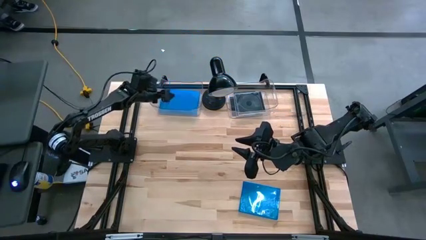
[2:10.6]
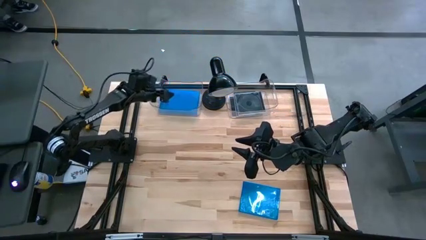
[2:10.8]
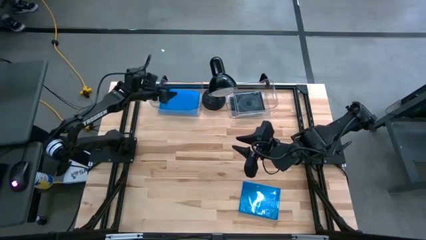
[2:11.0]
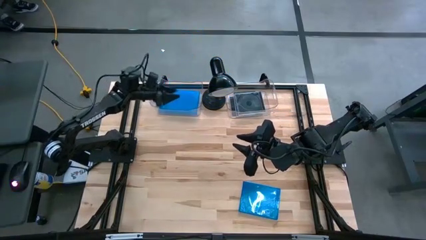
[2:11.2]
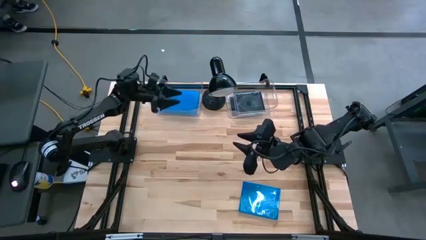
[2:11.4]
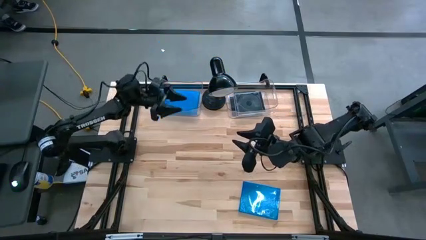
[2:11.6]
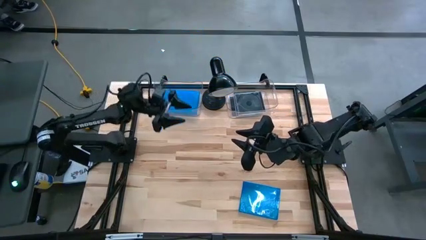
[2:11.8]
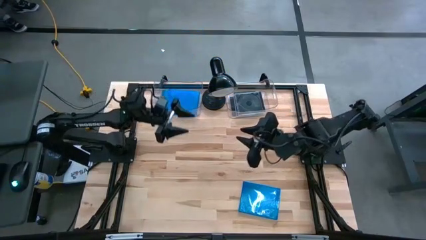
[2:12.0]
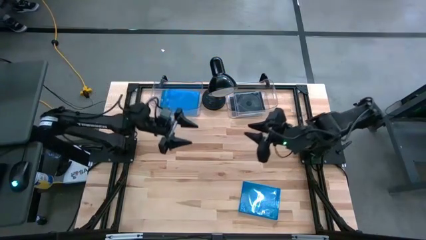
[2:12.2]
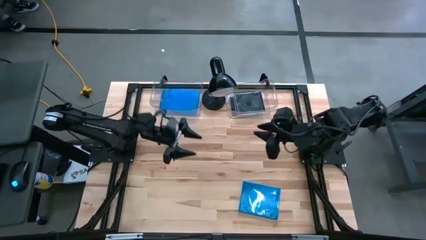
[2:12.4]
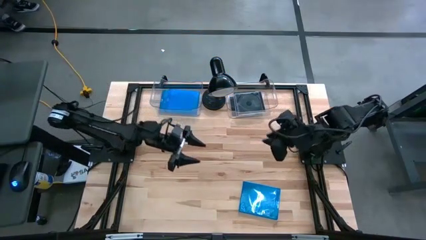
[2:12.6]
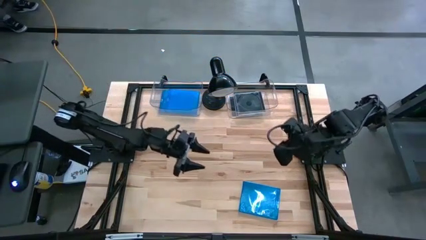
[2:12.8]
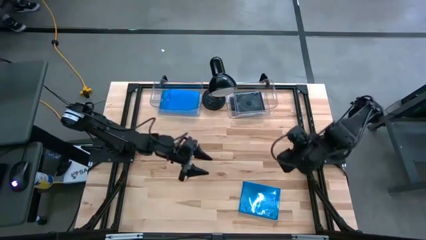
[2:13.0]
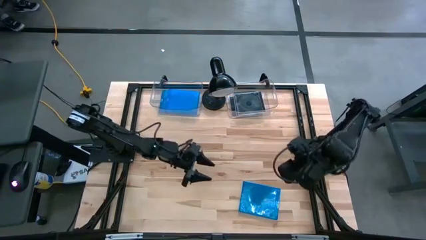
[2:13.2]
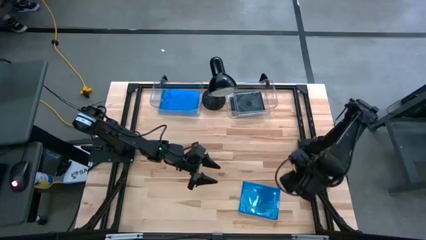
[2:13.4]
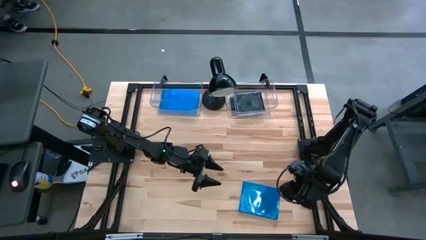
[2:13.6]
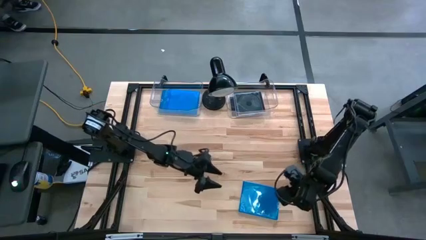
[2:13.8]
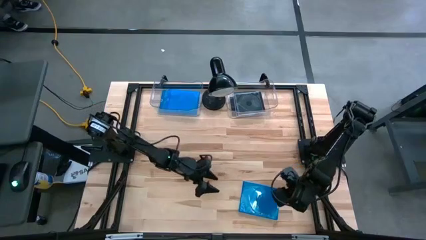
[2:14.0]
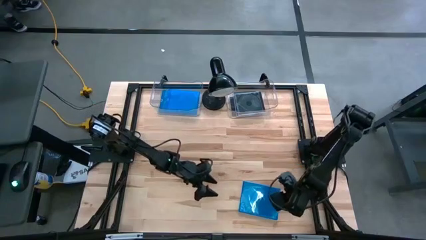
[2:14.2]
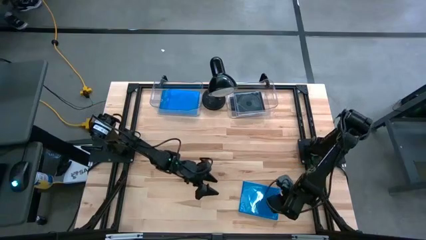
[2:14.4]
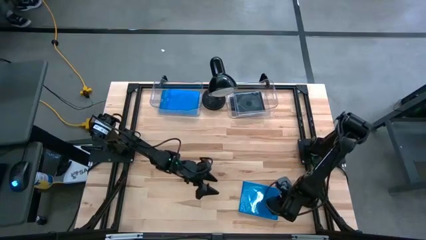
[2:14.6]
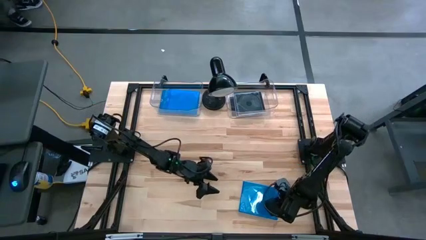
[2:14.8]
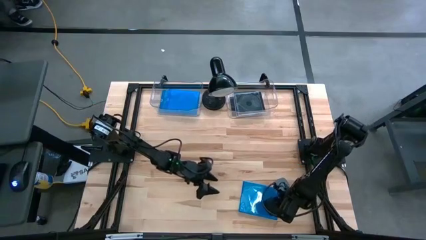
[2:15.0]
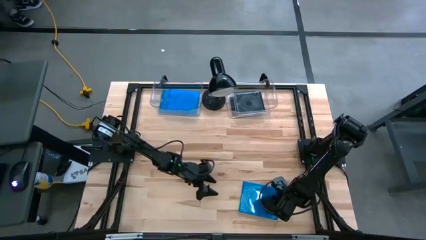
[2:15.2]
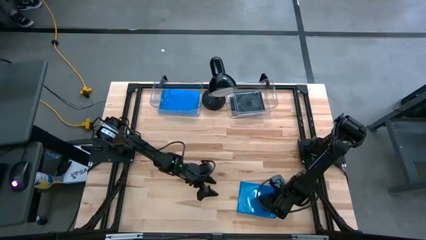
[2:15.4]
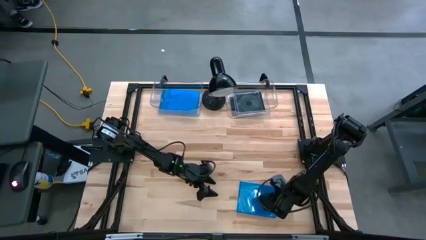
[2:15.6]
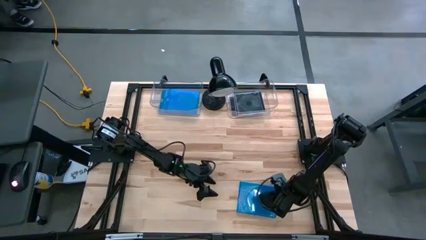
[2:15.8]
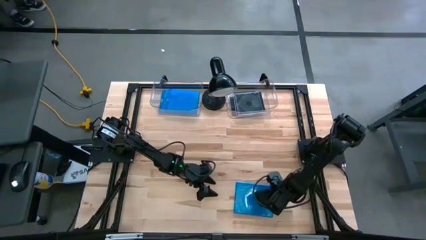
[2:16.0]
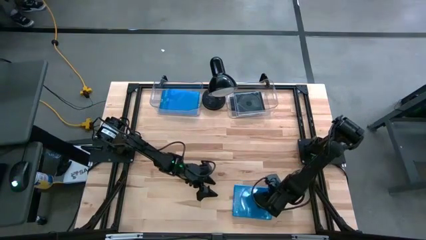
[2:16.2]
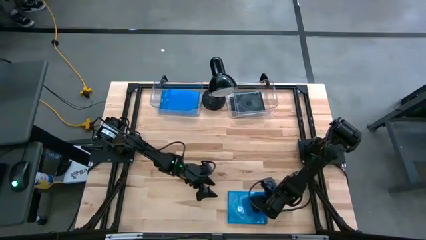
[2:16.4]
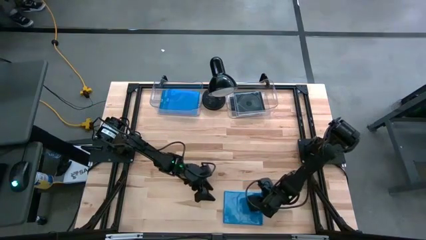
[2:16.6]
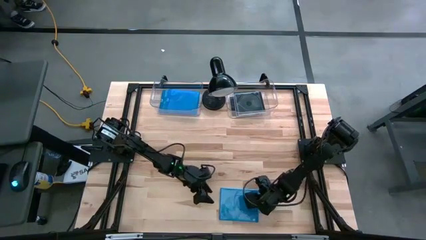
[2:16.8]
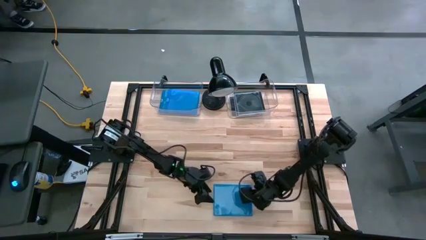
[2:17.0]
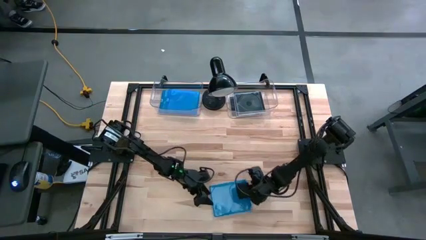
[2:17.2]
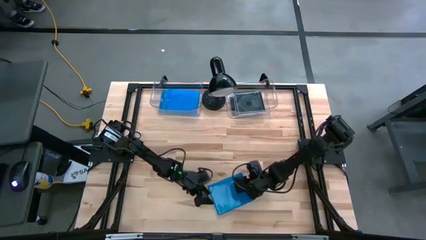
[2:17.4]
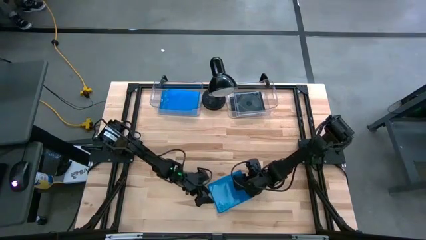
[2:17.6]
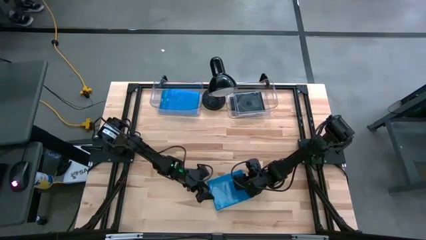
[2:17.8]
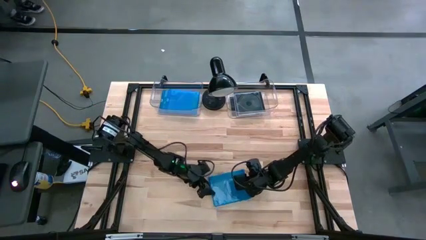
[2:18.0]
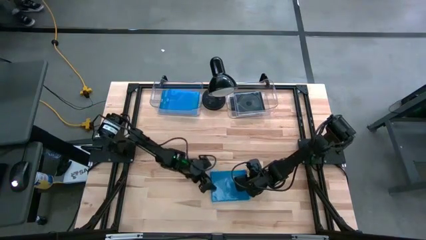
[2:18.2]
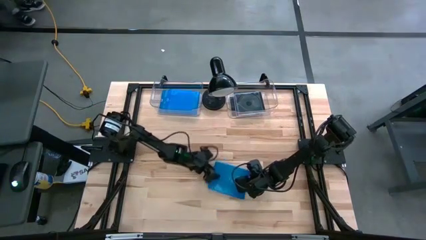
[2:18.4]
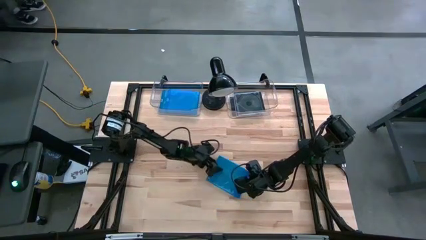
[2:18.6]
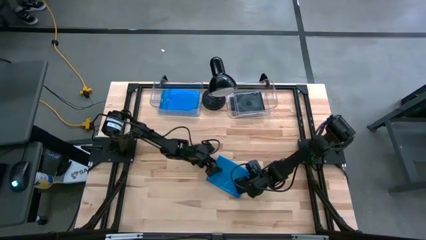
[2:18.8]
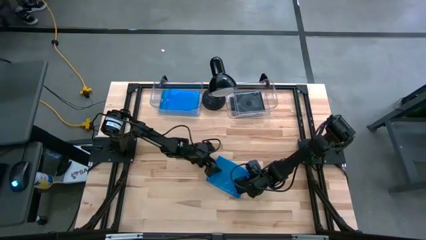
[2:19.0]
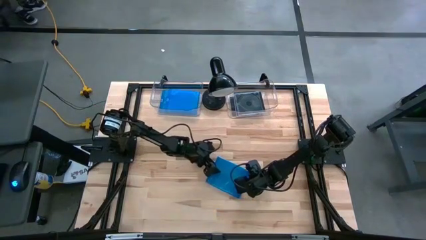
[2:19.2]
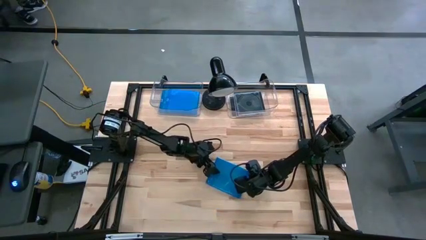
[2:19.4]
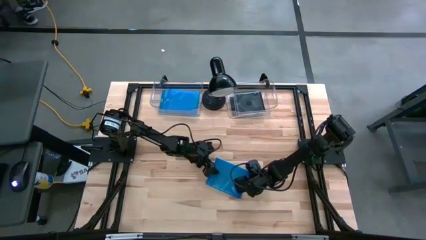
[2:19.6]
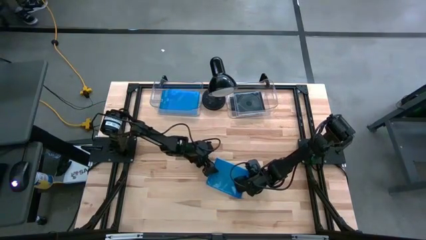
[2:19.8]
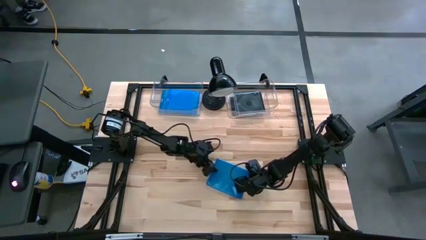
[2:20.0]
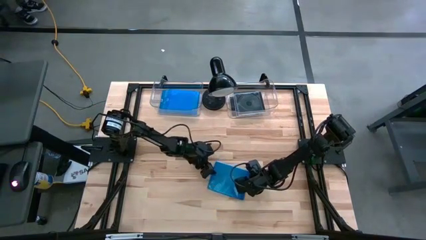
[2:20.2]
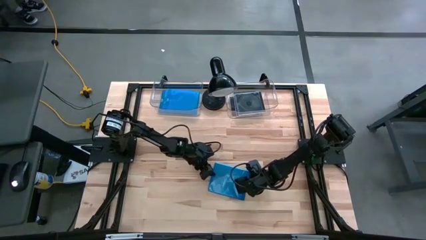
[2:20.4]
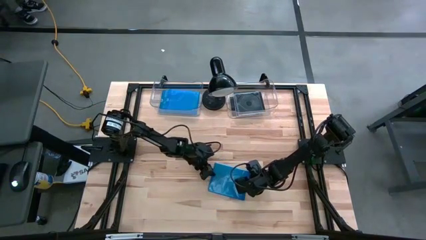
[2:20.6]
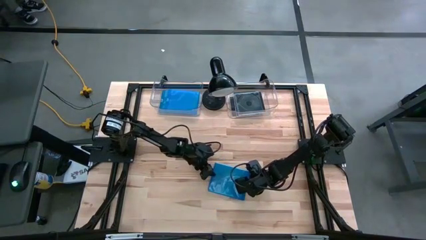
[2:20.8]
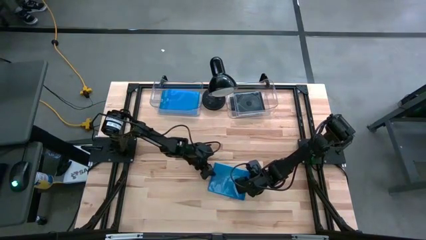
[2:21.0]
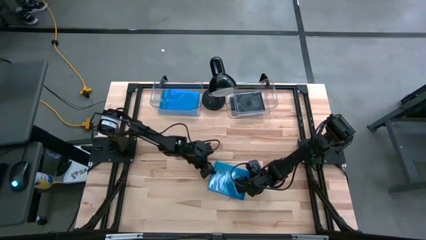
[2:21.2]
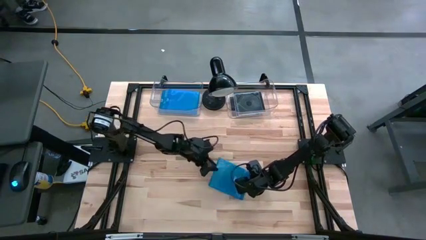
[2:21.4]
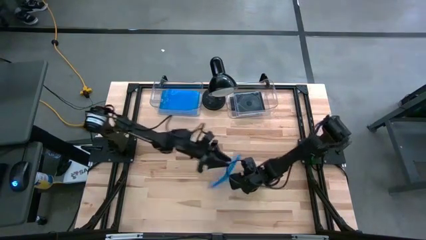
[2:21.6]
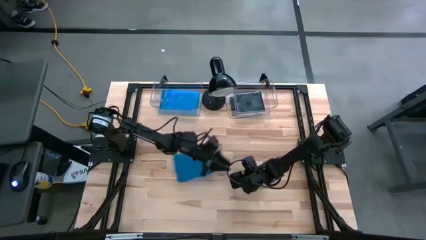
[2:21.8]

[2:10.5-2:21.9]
Task: Pick & place jewel cases by type
Put the blue CD case into the left transparent bin

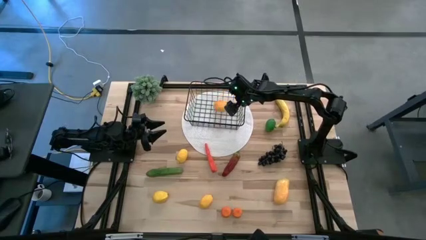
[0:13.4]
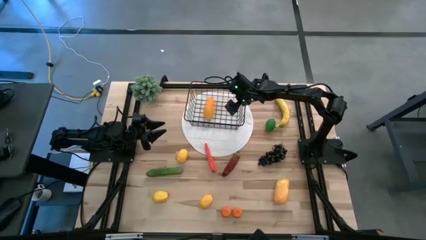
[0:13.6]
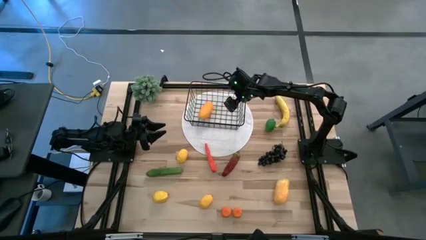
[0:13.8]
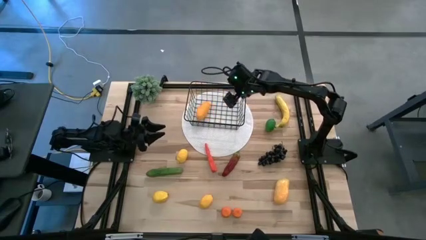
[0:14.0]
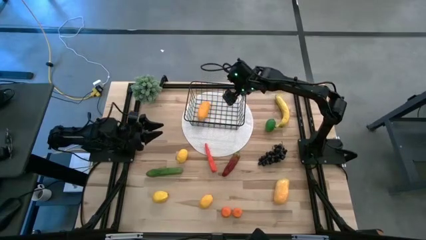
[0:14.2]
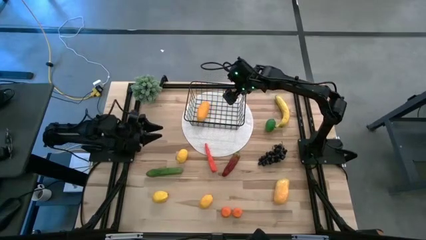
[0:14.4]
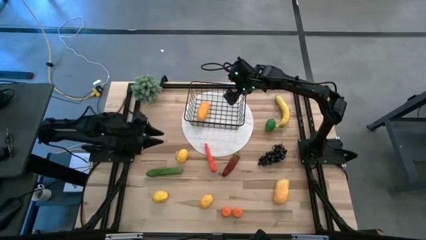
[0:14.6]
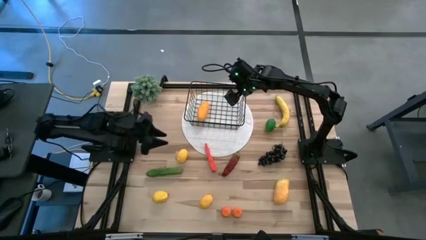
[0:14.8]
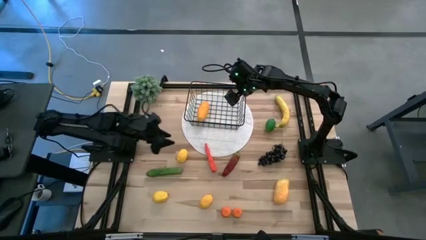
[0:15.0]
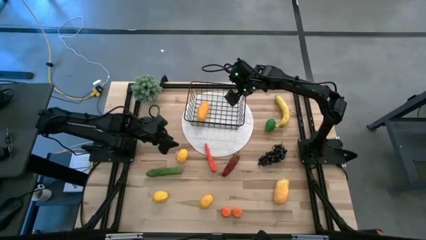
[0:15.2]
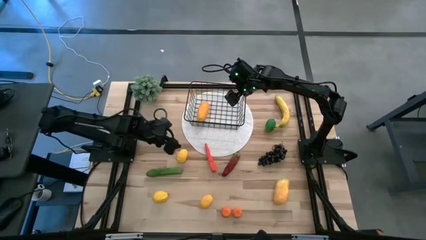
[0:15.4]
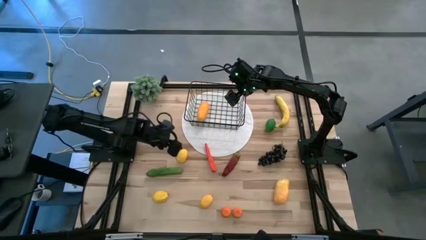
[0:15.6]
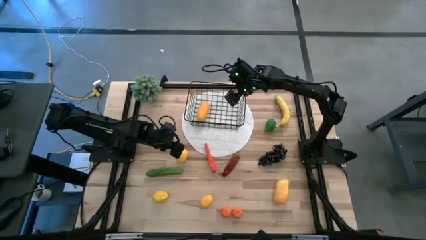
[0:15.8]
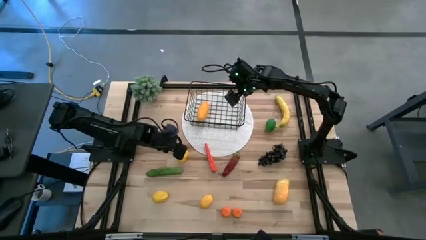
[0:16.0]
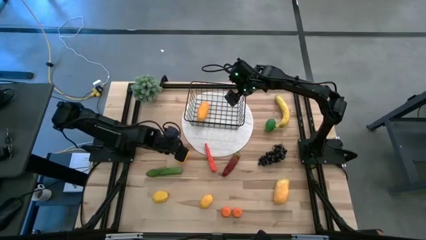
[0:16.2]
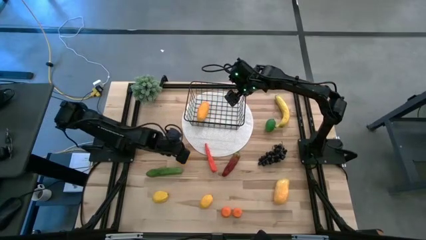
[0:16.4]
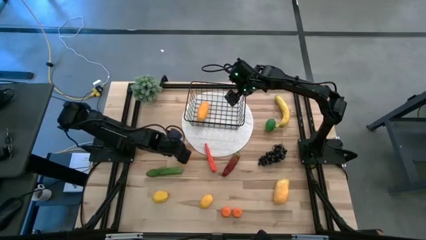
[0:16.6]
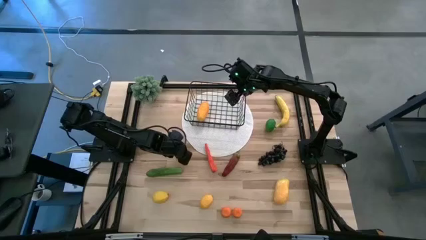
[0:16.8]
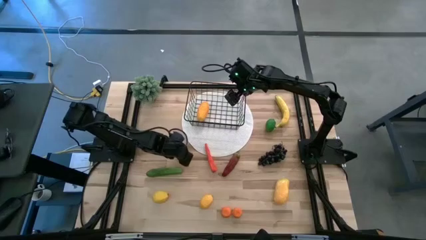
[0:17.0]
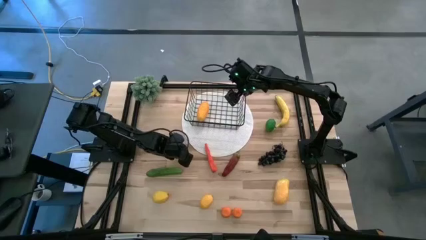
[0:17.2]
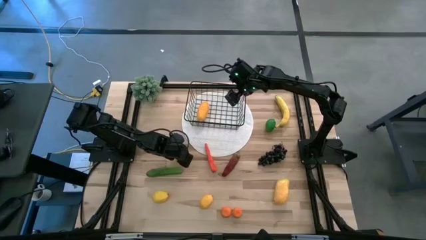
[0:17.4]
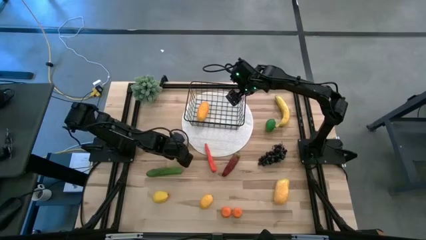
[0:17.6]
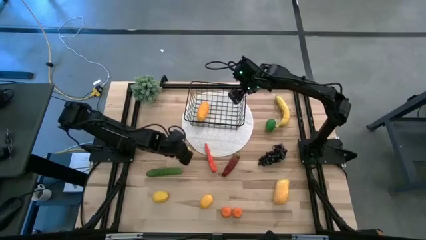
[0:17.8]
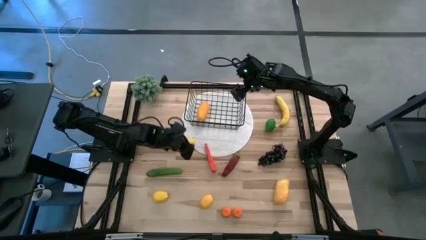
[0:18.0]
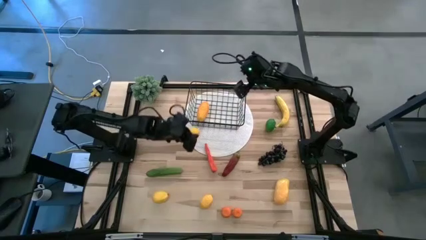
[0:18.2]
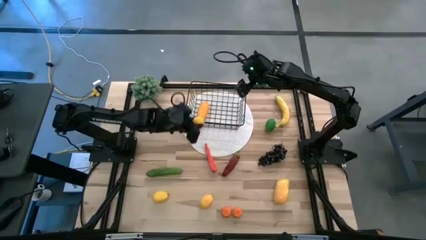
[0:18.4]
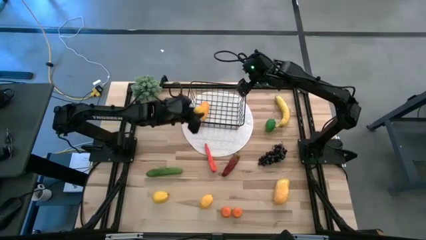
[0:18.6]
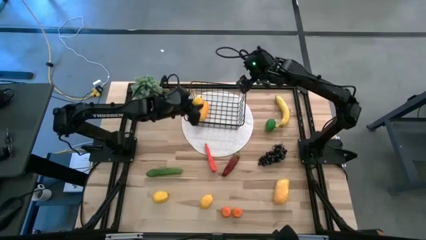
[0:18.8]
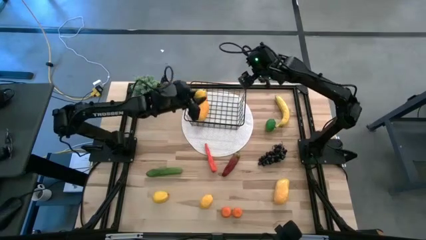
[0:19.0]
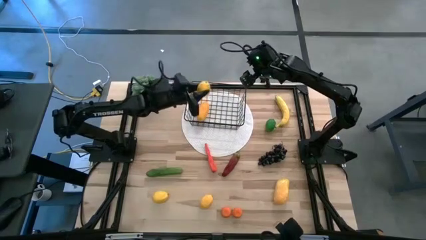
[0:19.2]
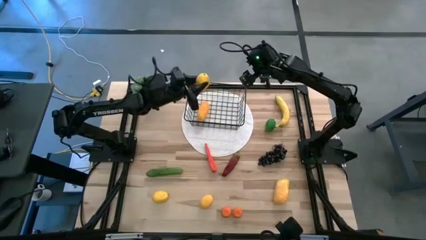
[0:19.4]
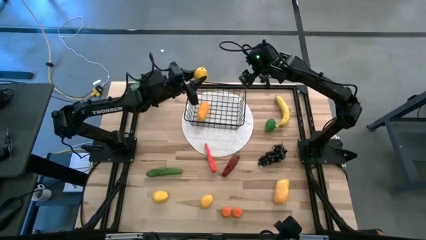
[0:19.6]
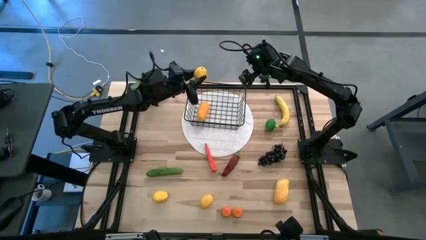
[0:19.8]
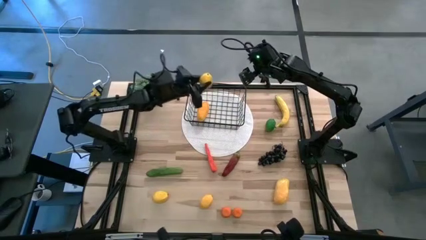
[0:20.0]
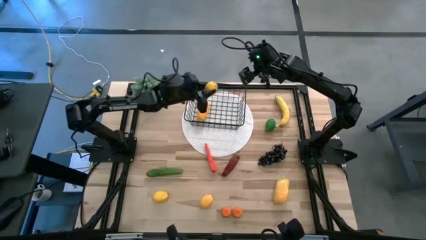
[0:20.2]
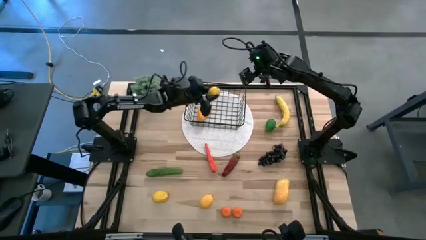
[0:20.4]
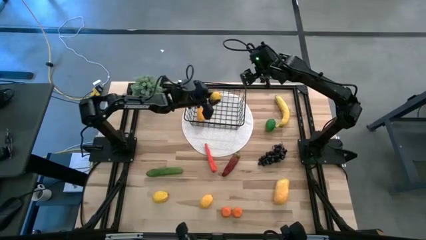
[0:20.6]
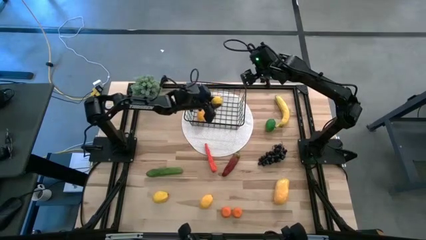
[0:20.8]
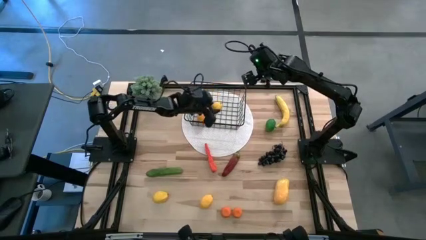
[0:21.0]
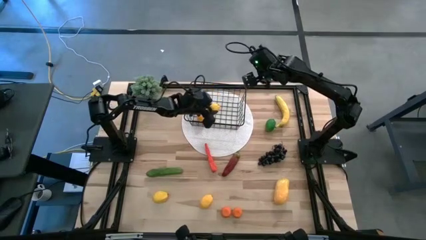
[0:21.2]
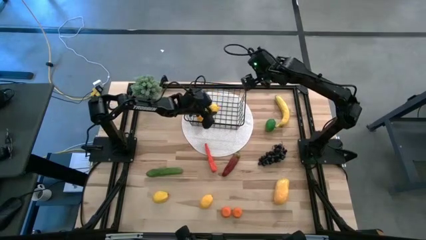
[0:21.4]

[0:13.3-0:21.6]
Task: Build produce basket
Put the top lemon into the wire basket
